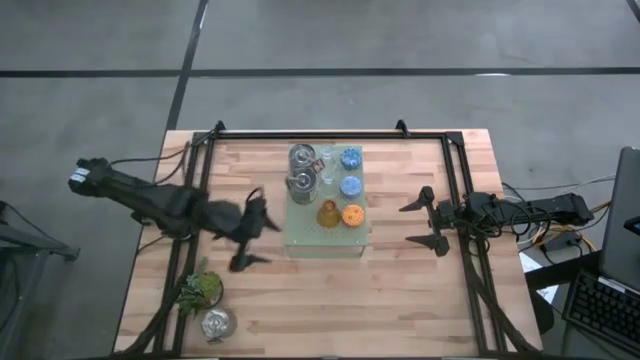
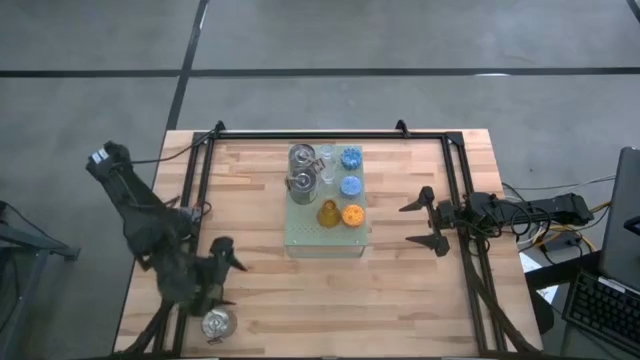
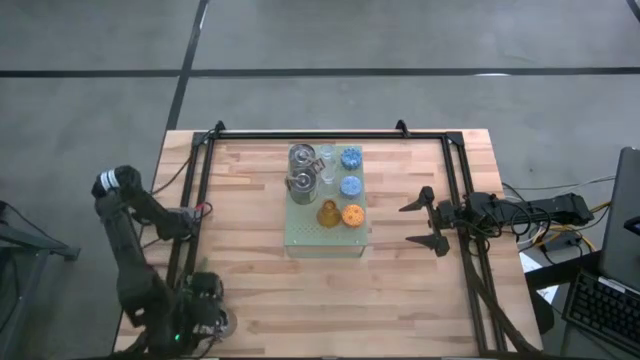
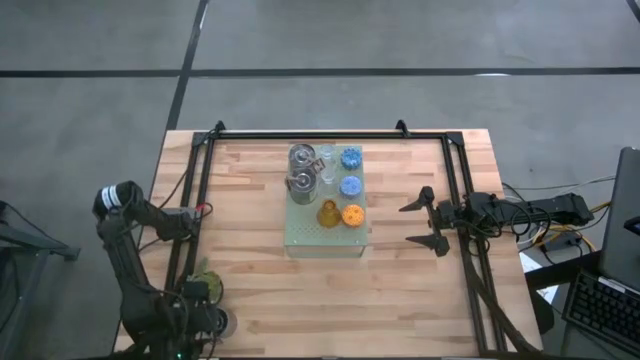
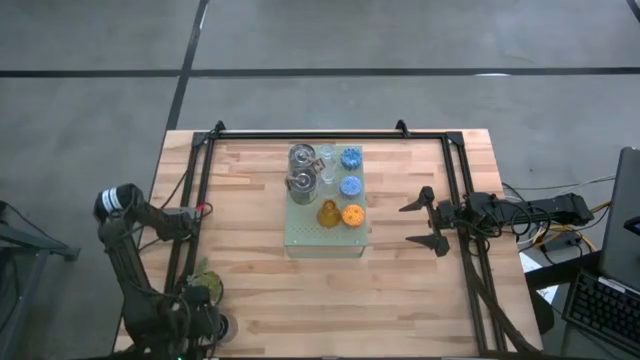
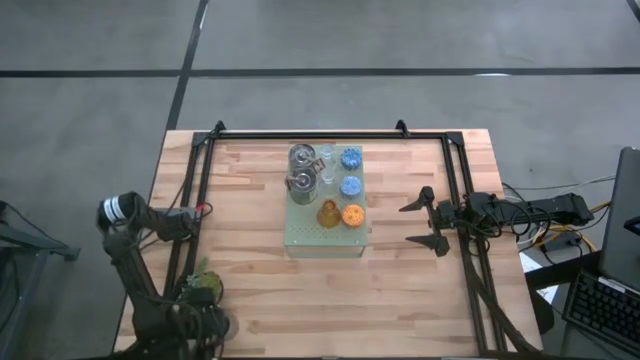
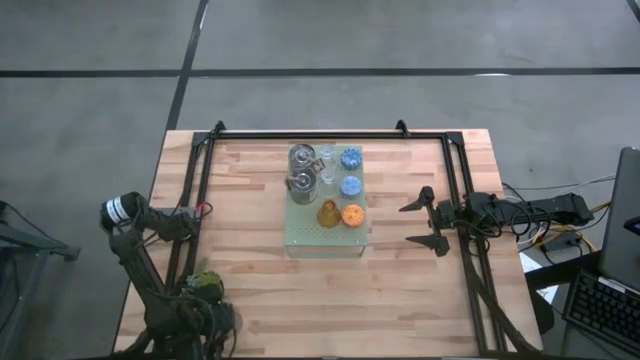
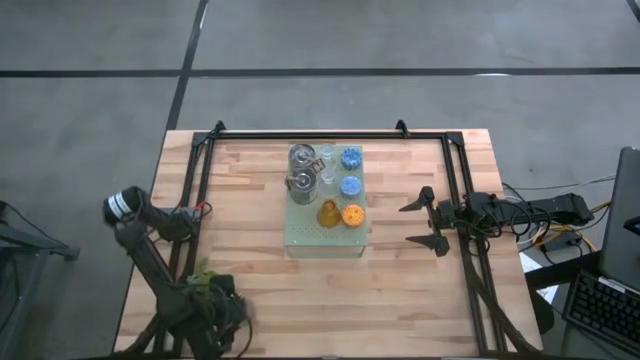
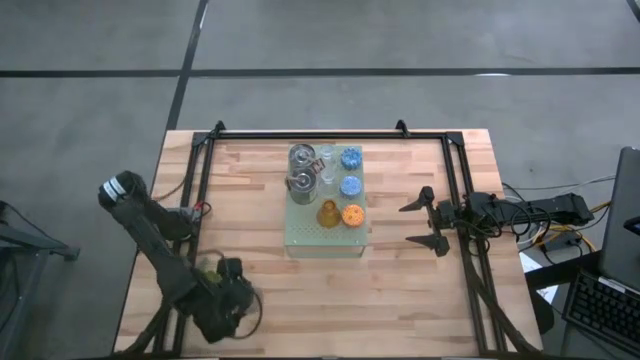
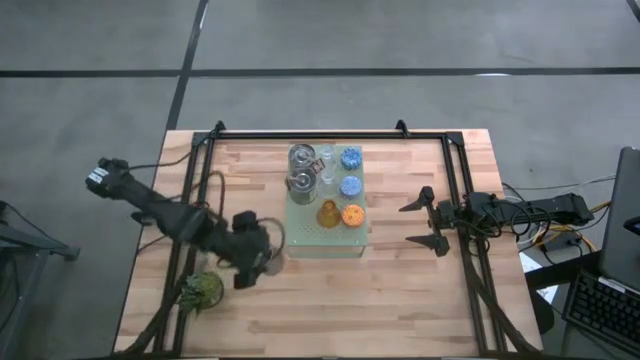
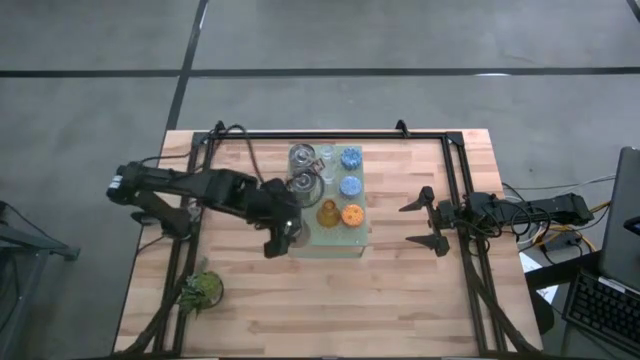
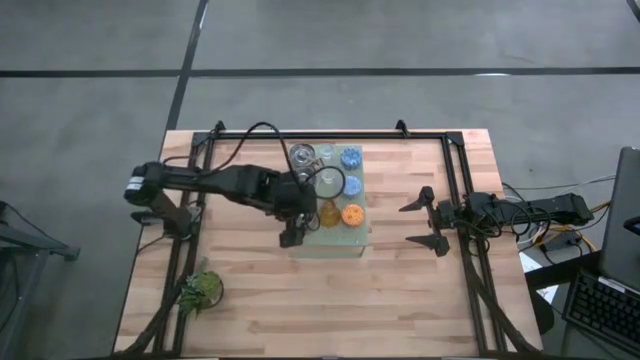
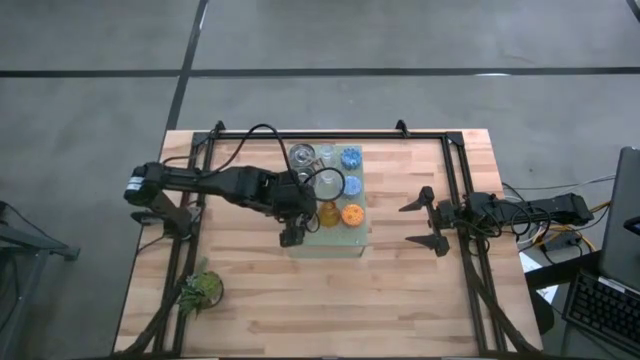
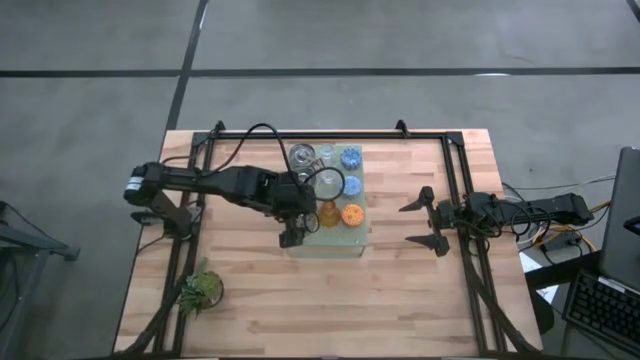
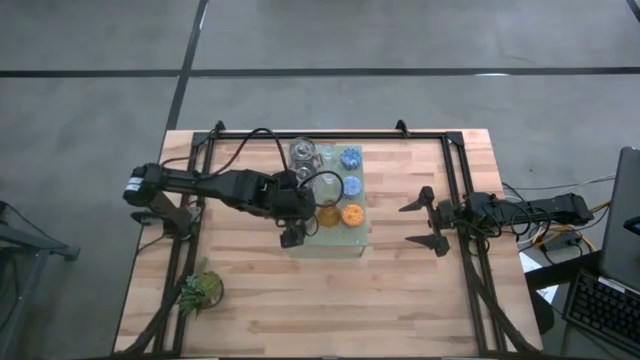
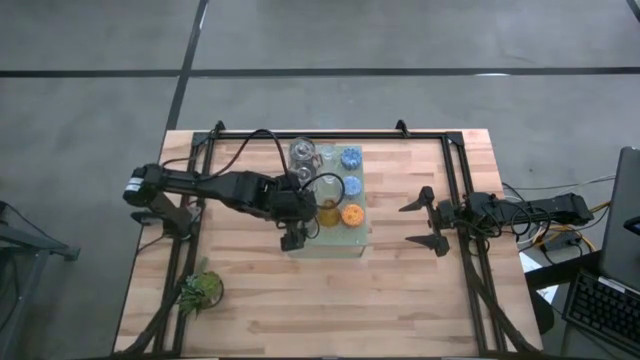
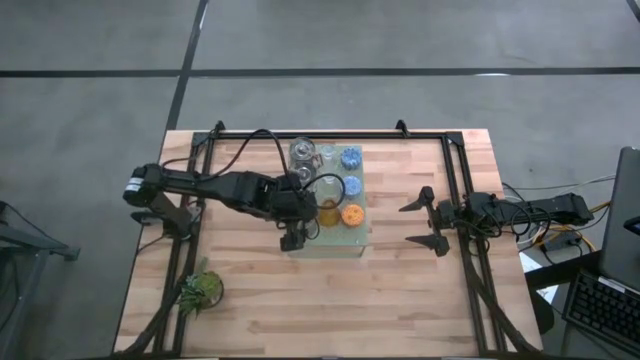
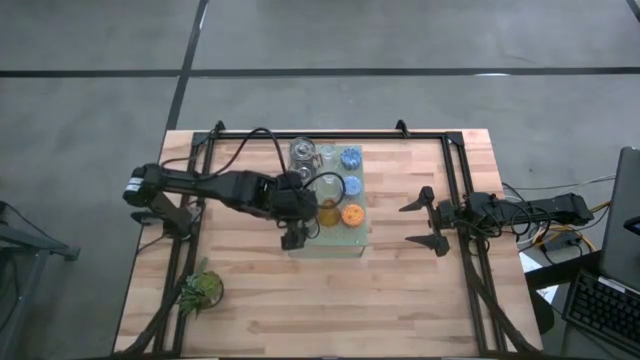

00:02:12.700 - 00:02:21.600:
Task: Pick & Place candle stick holders
Put the brown scented candle on the shelf aligned with the other green scented candle

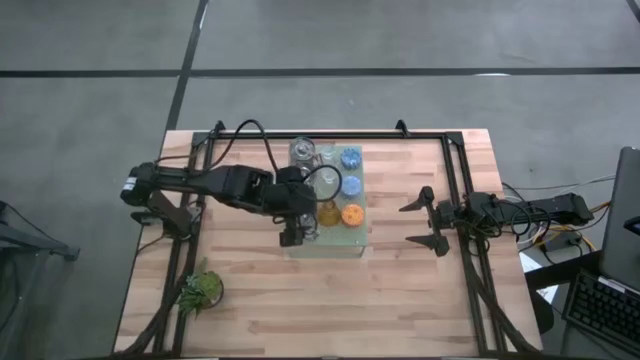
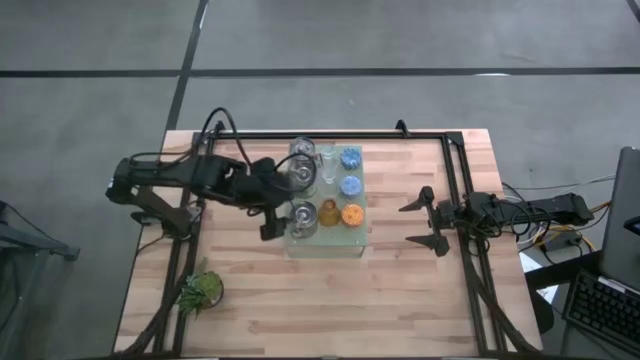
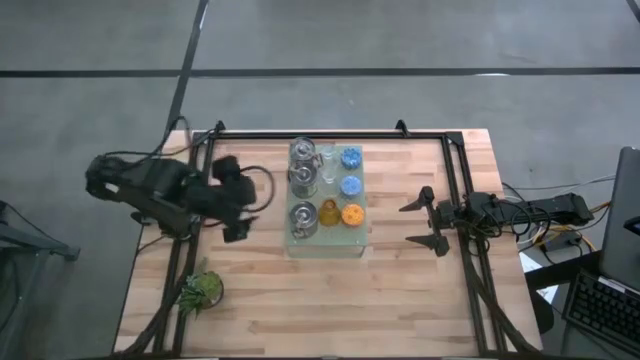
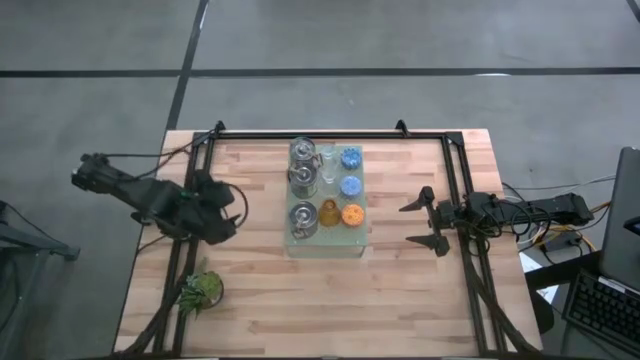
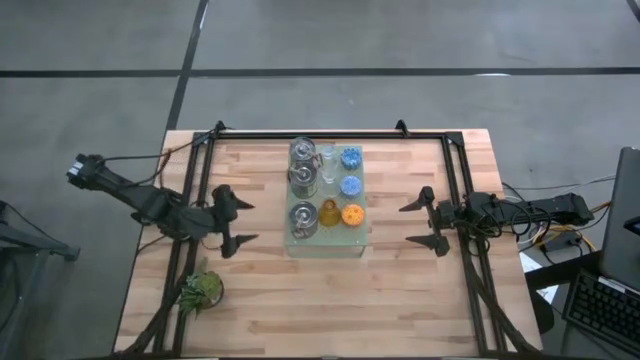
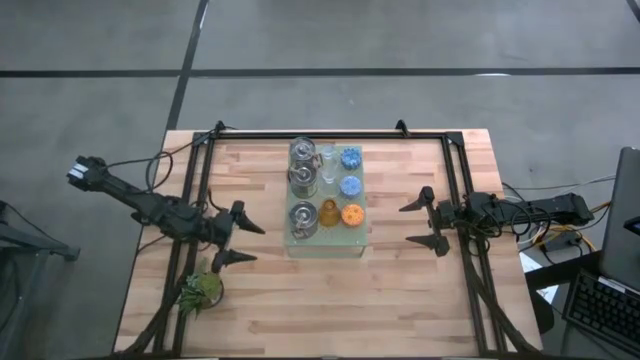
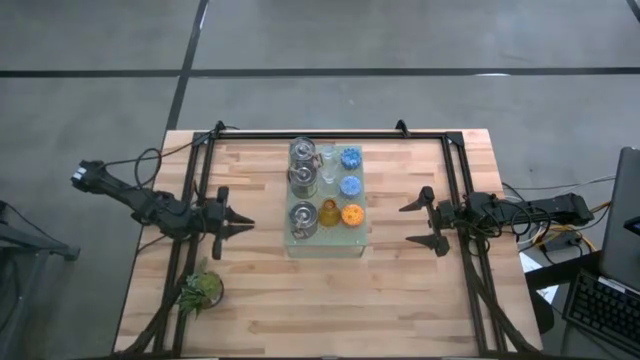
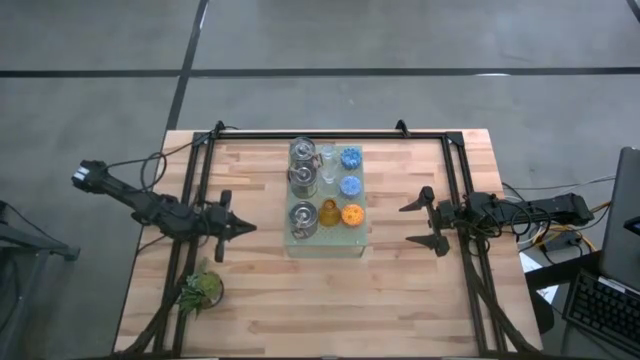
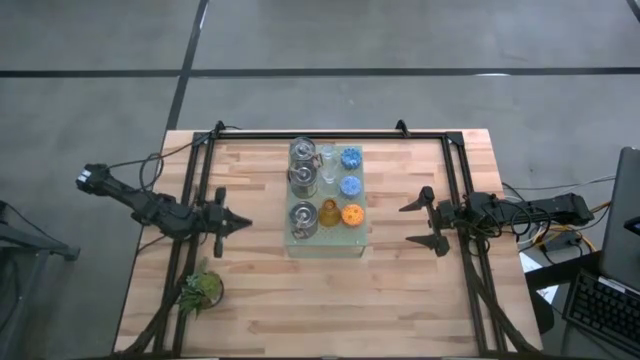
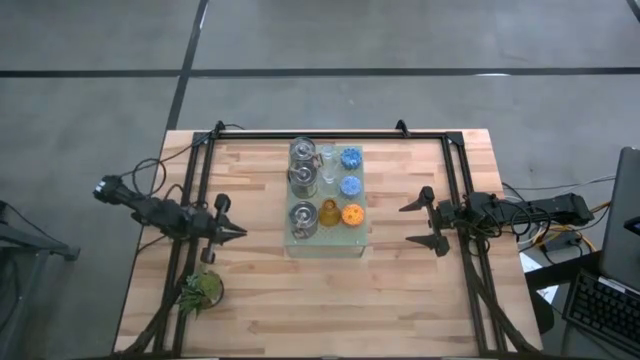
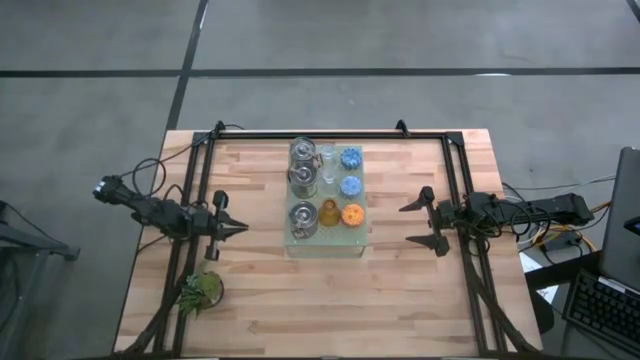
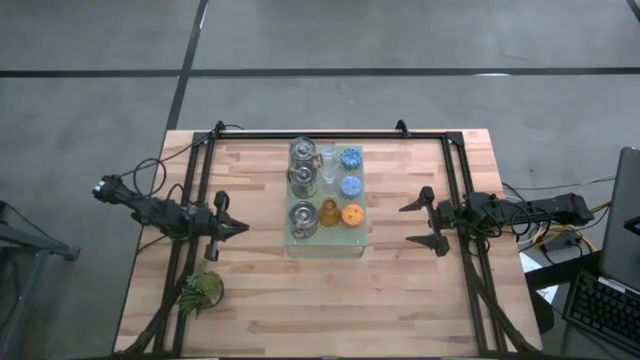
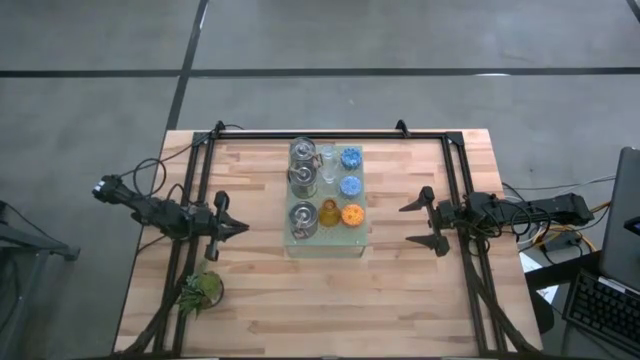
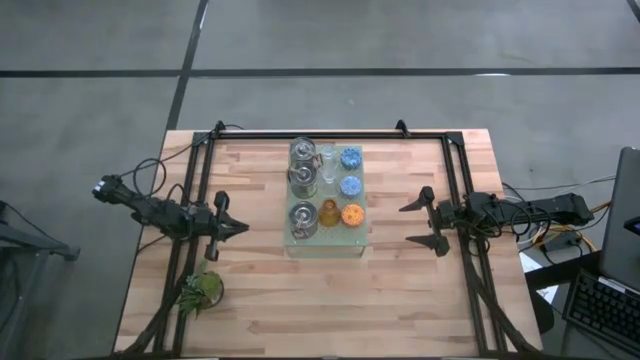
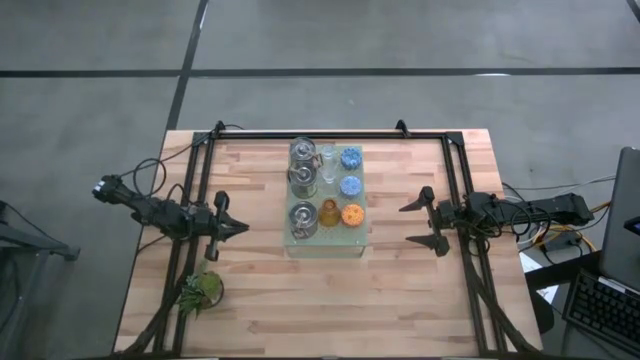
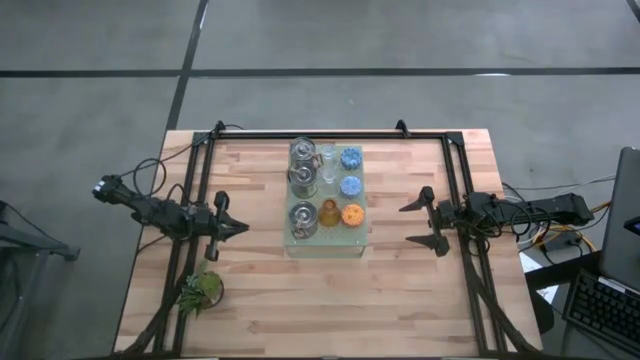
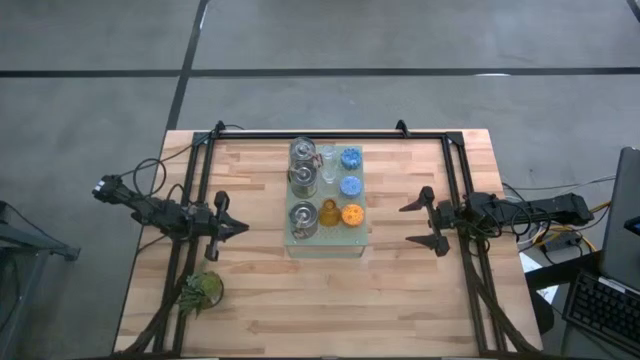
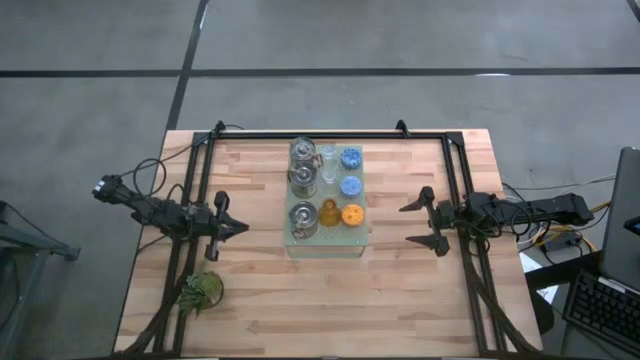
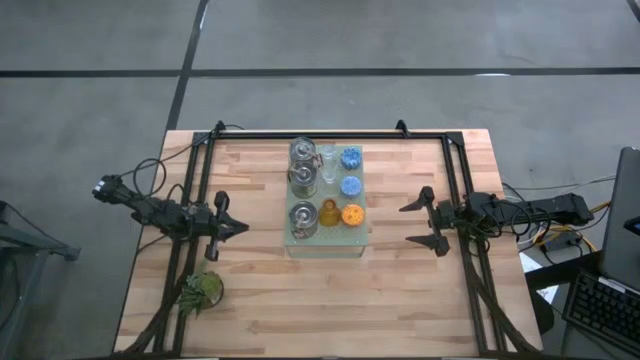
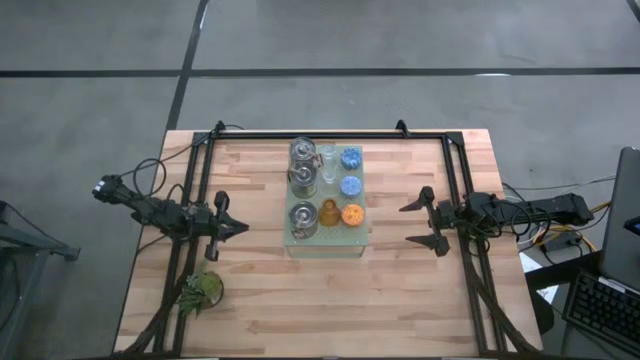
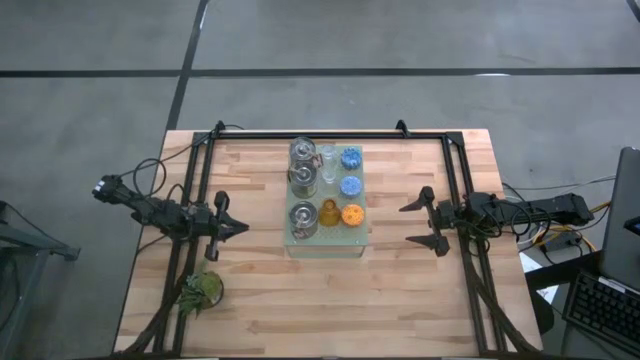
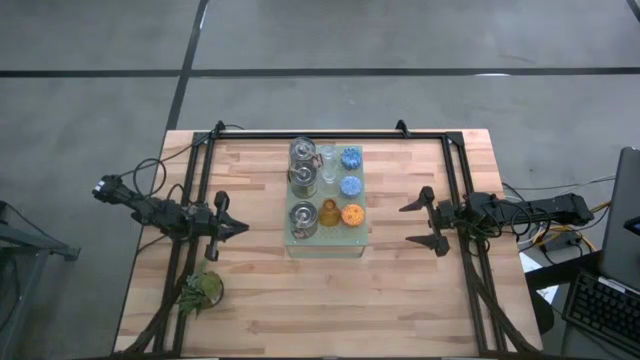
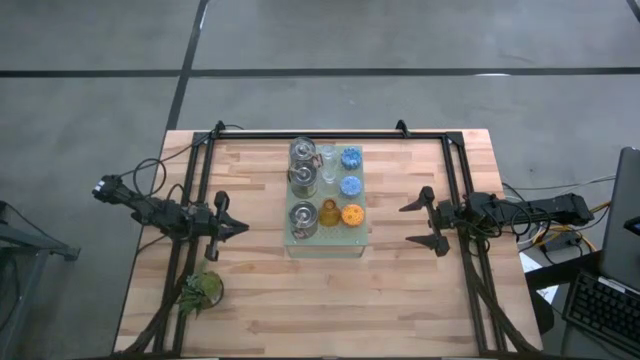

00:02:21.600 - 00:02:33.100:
Return to Home Position
